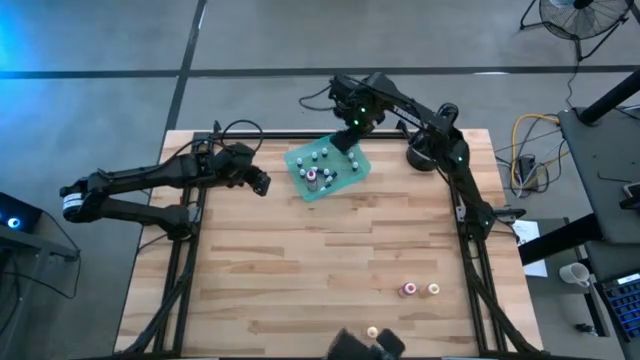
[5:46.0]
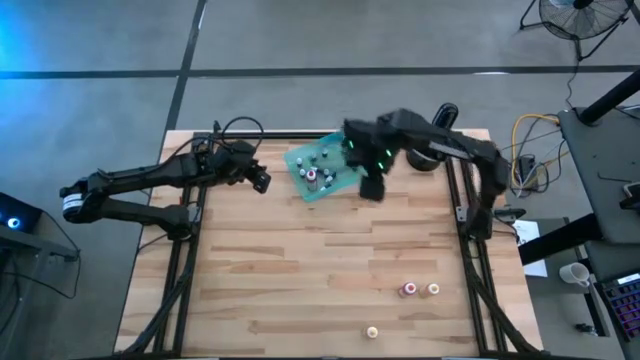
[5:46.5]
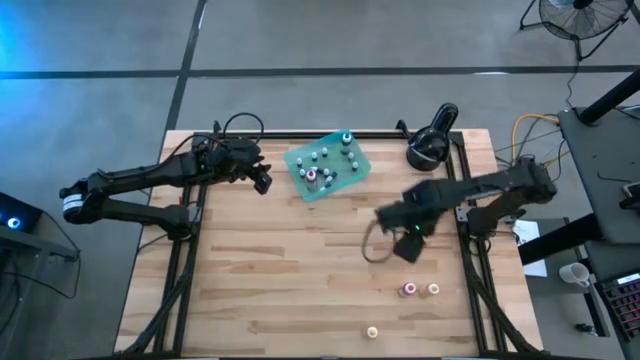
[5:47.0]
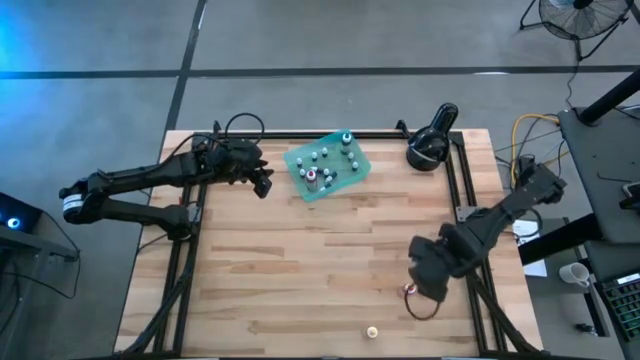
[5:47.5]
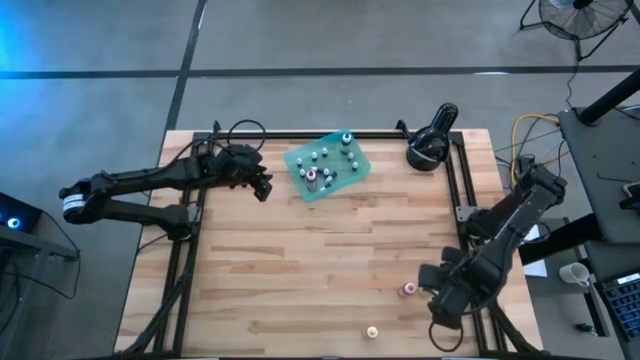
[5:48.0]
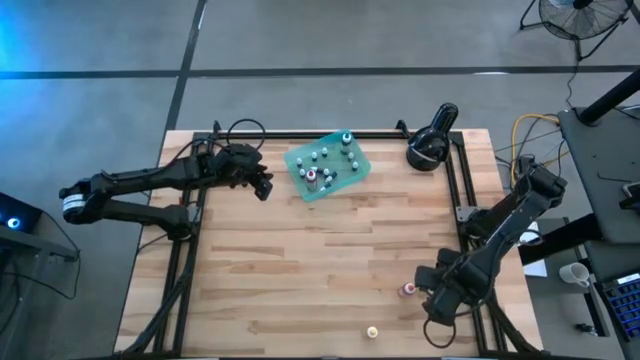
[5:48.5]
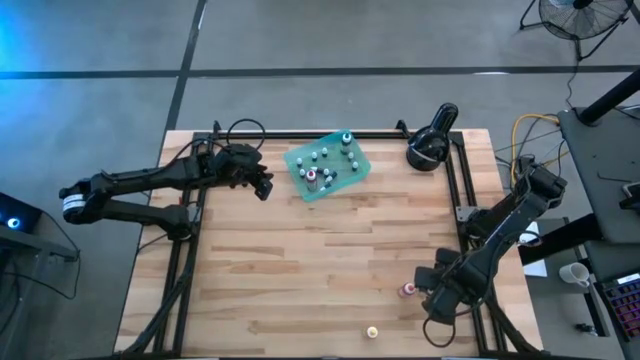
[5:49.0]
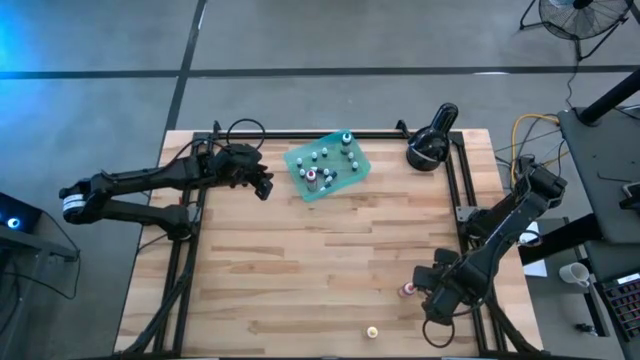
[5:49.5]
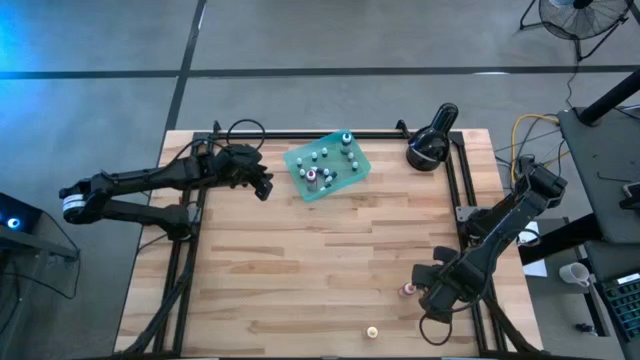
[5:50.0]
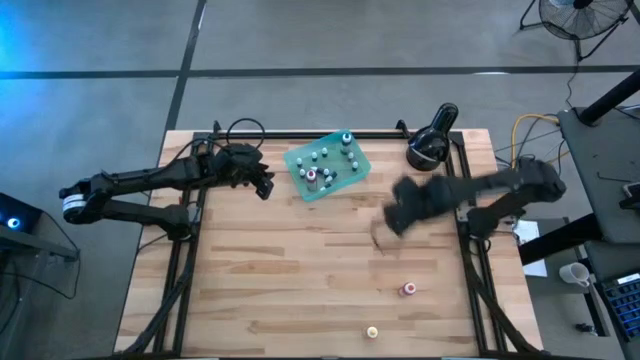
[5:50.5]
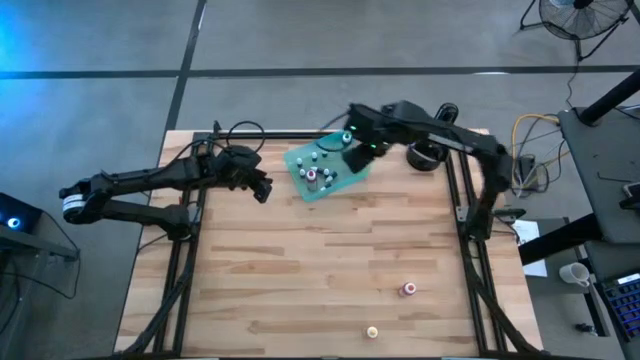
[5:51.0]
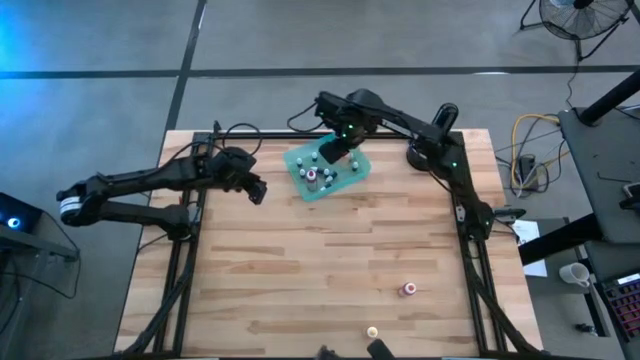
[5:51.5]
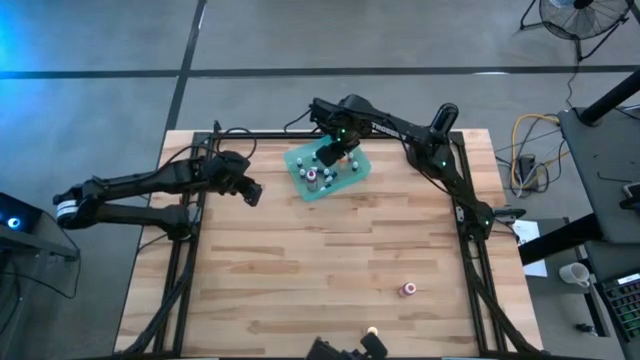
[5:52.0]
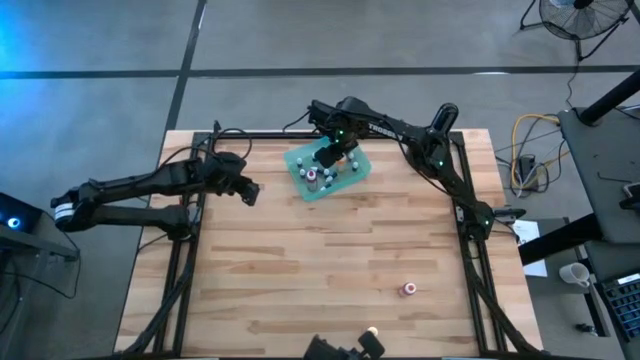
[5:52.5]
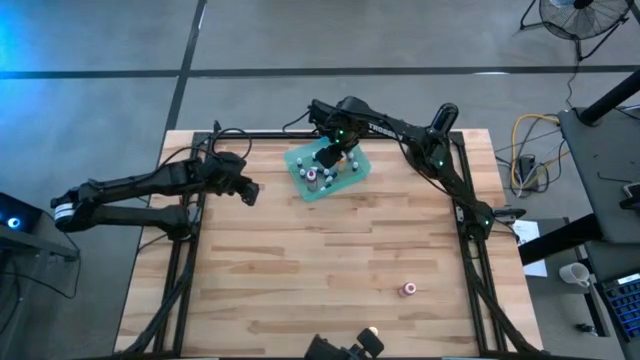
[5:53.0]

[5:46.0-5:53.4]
Task: Pick & Place food coloring
Put the green big food coloring into the green bin

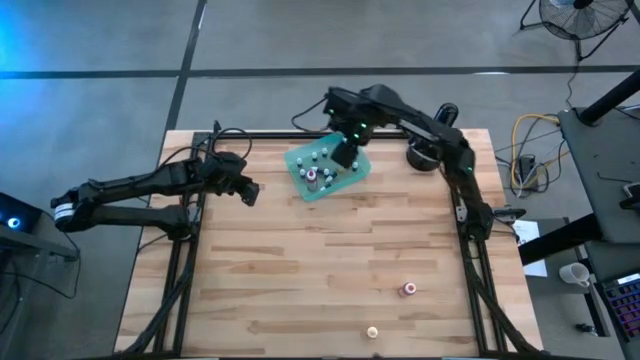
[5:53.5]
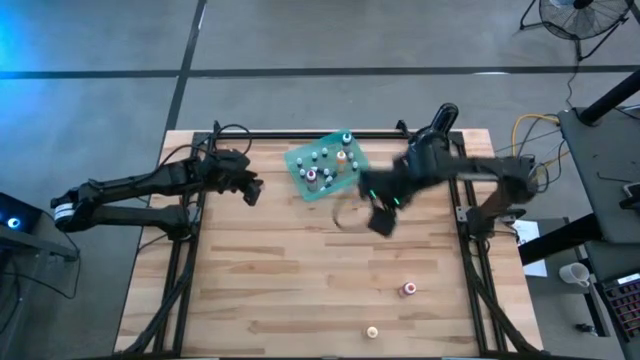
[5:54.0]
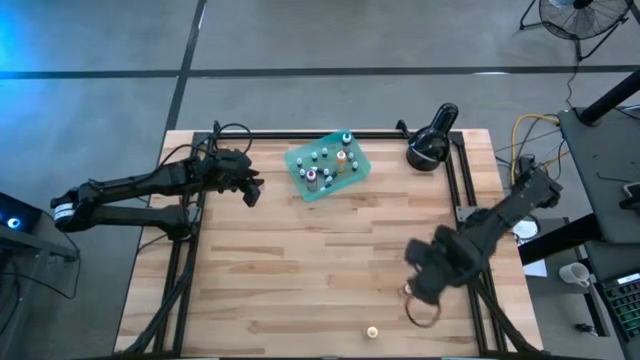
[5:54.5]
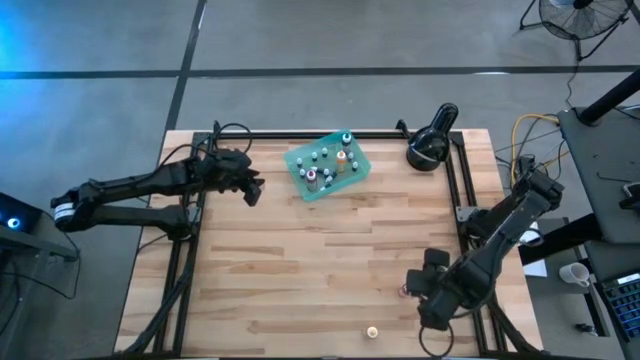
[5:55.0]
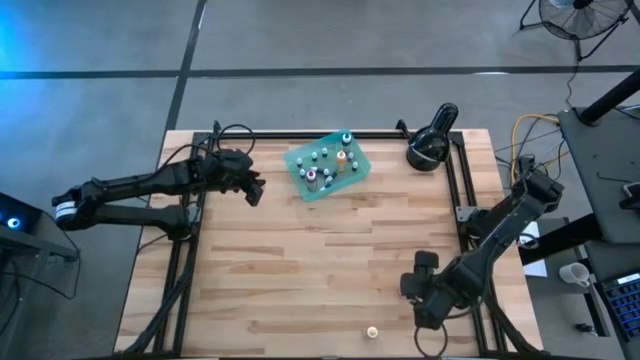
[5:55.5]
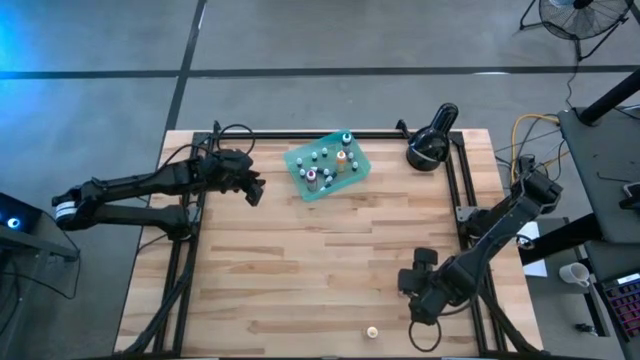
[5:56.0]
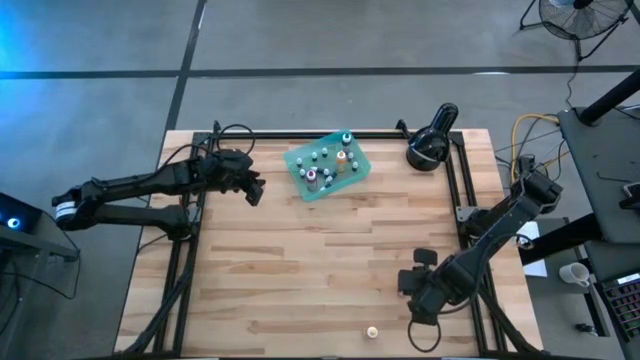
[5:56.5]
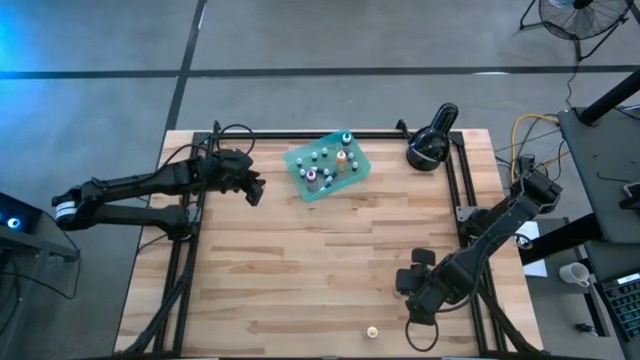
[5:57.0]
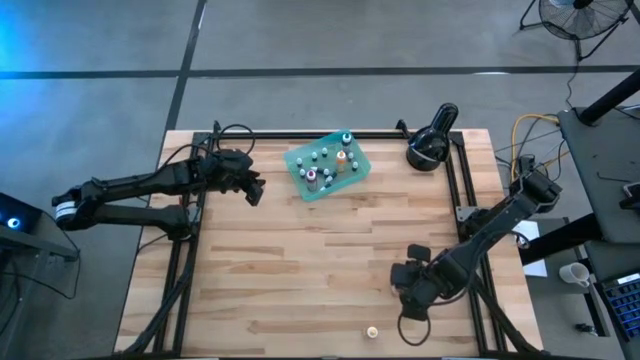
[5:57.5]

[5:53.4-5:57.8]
Put the yellow big food coloring into the green bin

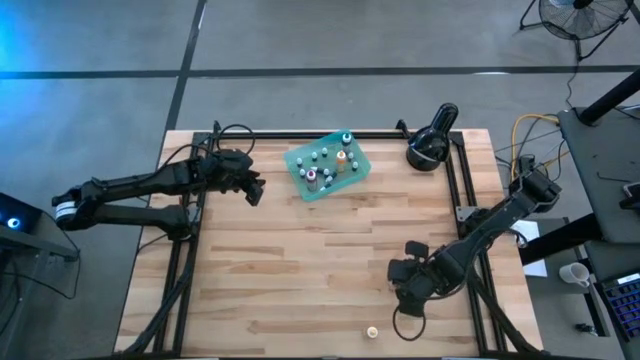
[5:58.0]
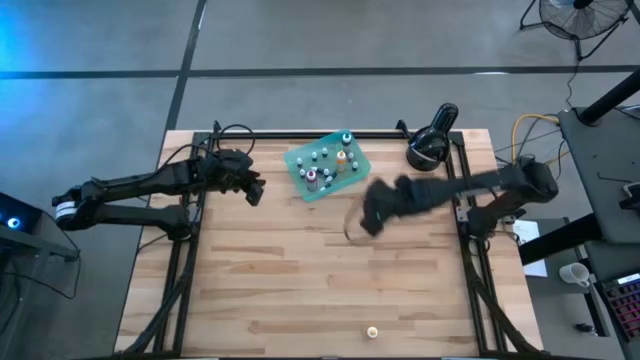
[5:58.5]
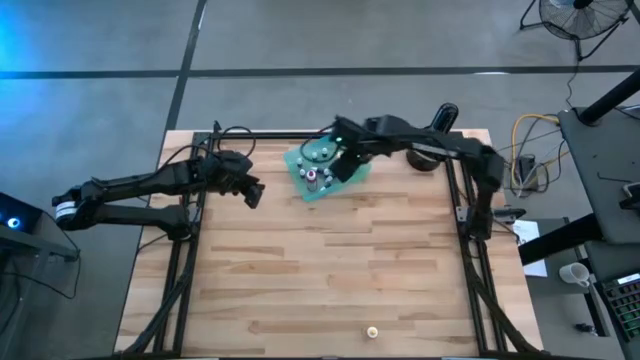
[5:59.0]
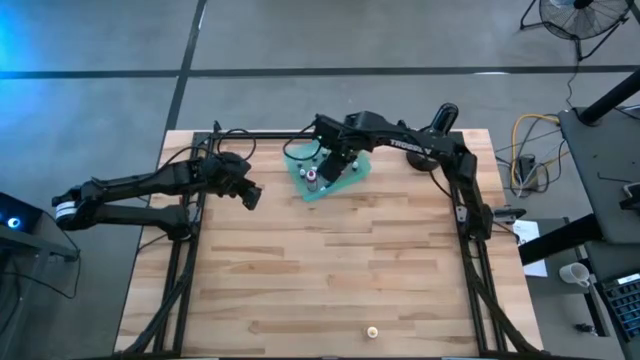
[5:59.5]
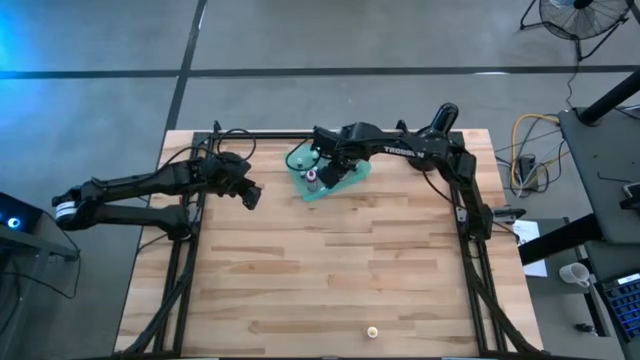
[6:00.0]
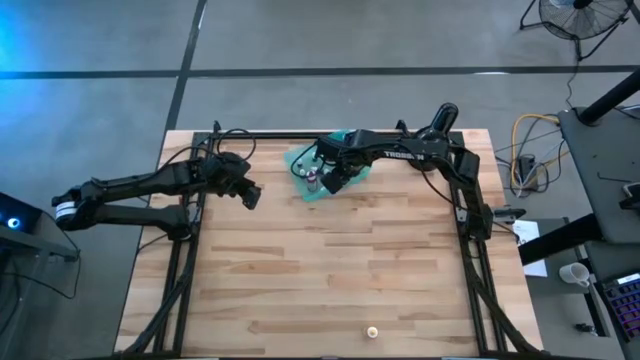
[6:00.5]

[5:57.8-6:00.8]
Put the orange big food coloring into the green bin

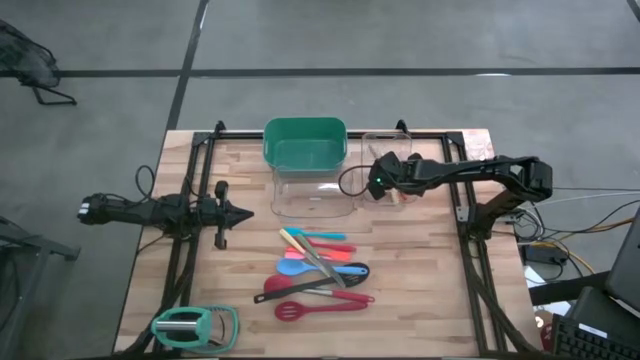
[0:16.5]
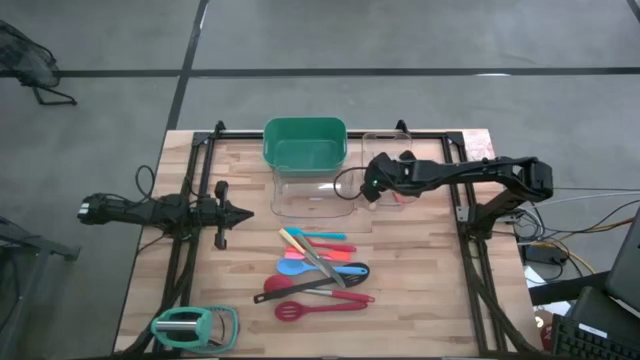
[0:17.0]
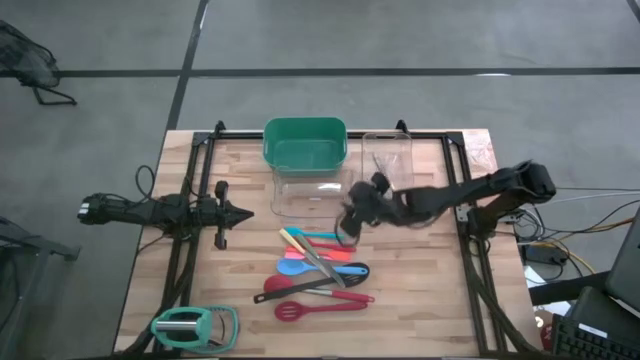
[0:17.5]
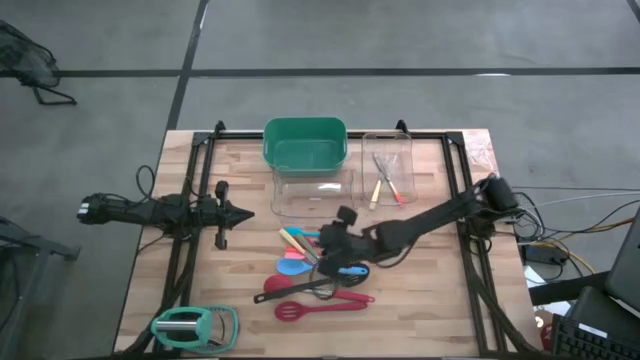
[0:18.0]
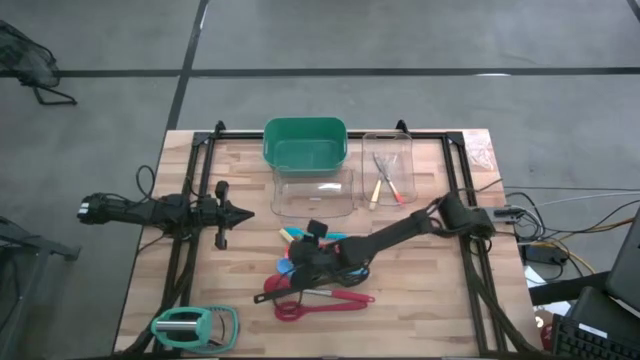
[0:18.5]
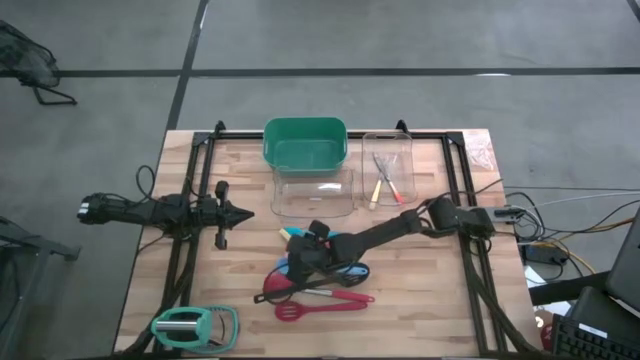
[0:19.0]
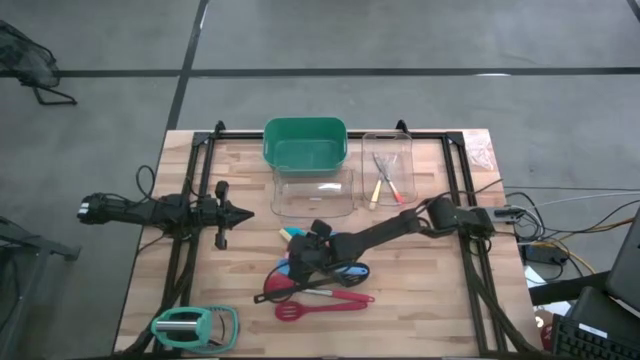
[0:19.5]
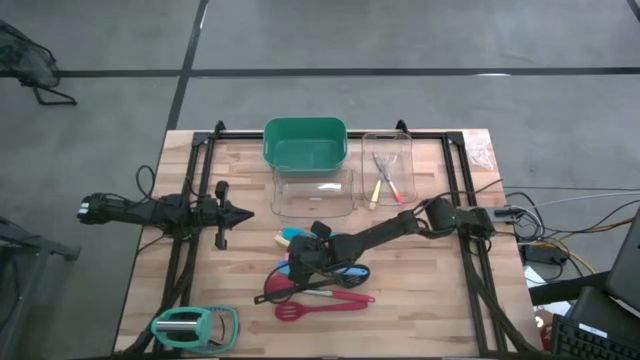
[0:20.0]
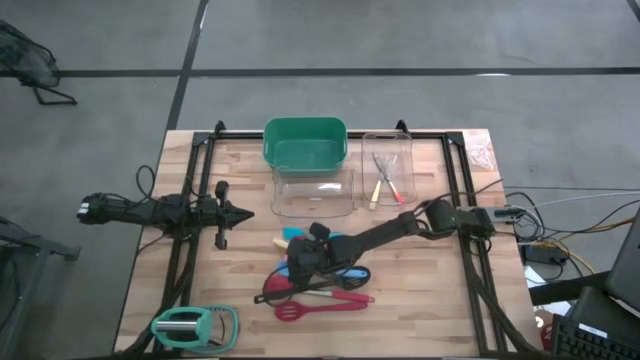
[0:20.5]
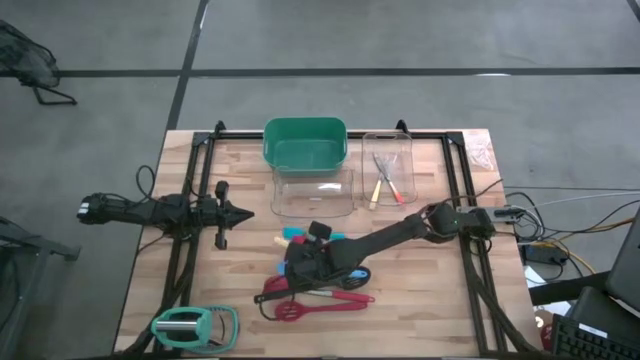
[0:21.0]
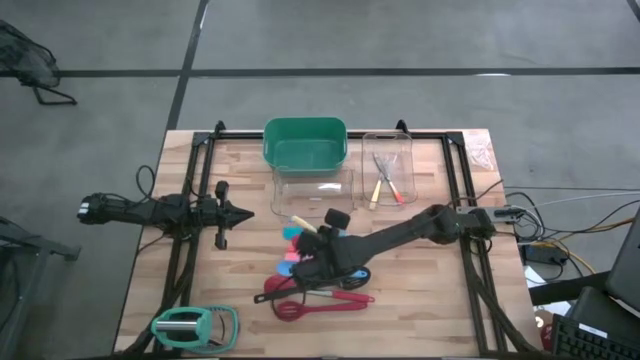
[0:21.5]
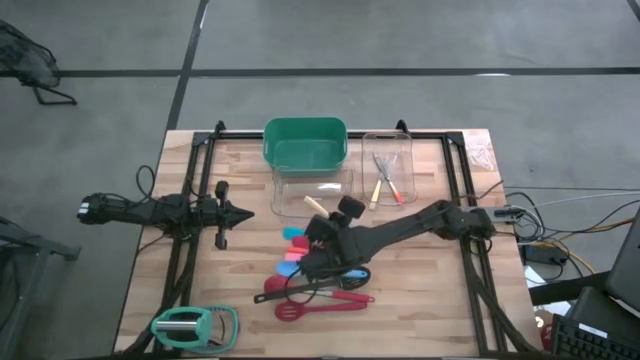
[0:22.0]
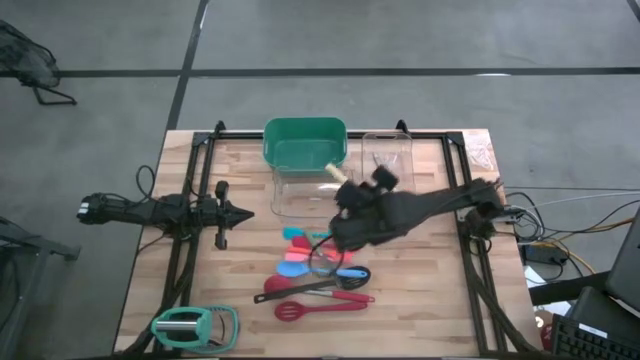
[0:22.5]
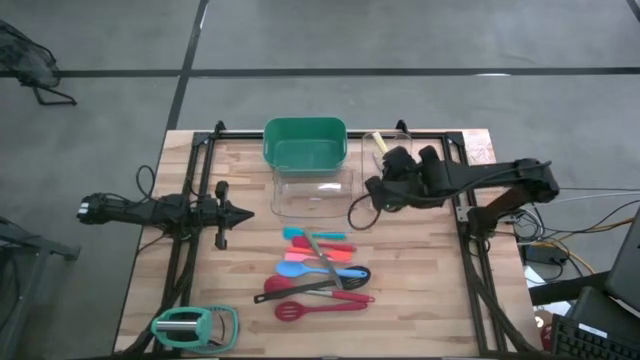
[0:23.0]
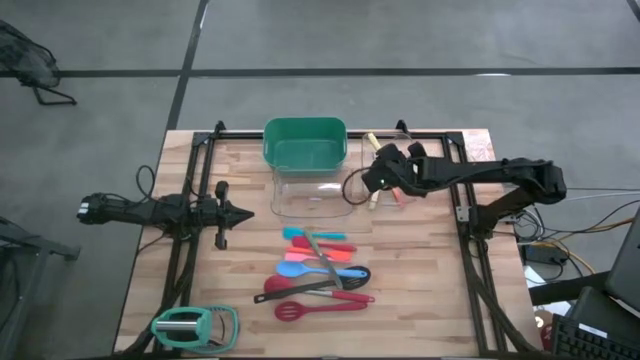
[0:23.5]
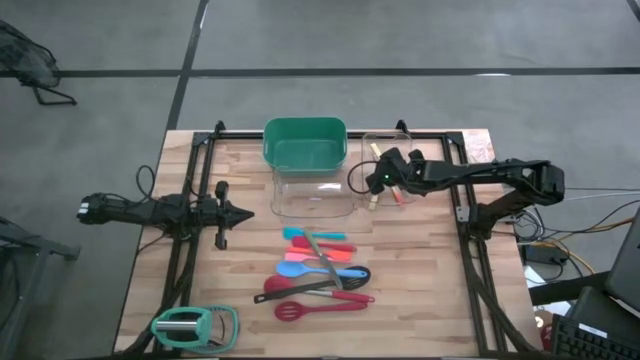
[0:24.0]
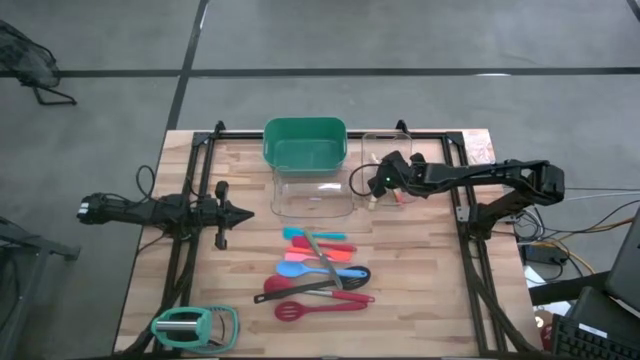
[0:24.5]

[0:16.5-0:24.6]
Task: Pick & Place Kitchen Items
Put the yellow knife into the right transparent bin
